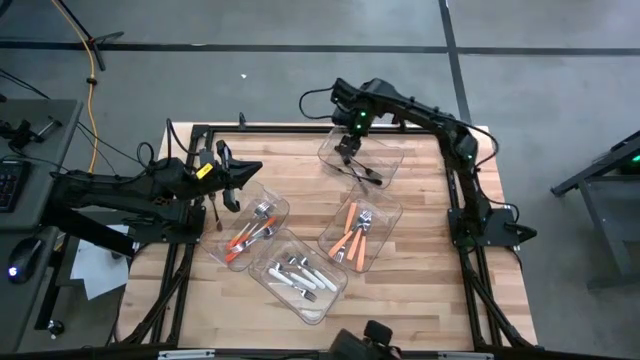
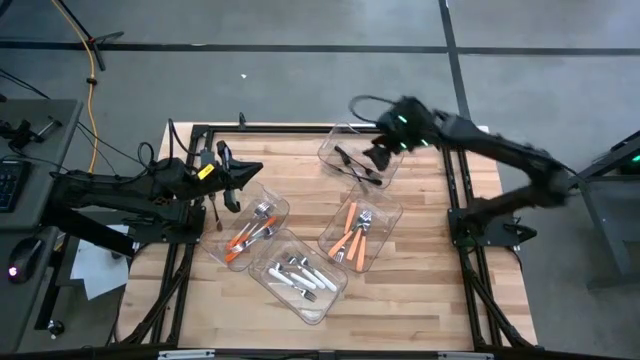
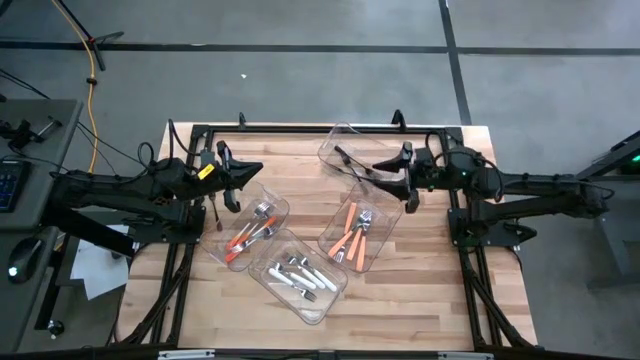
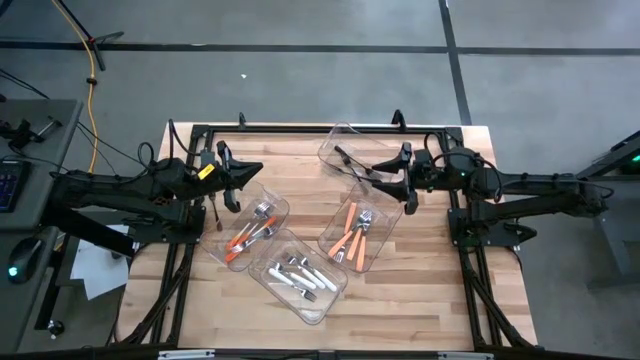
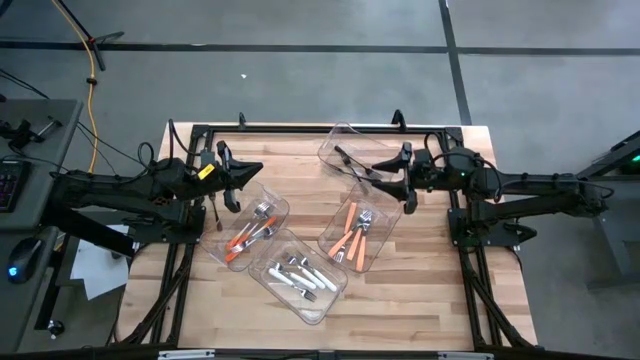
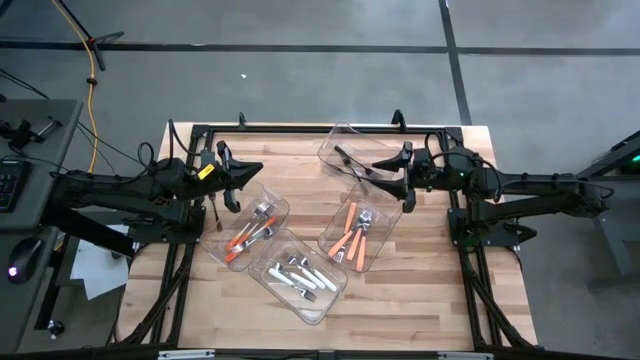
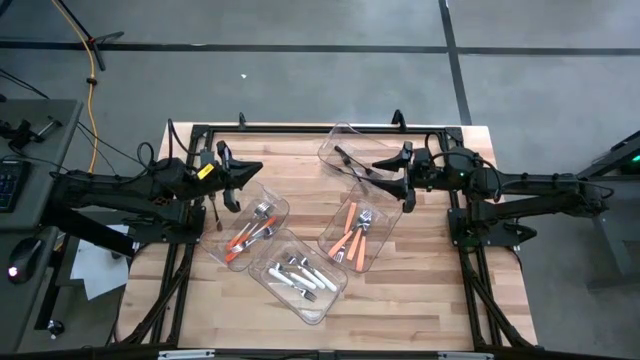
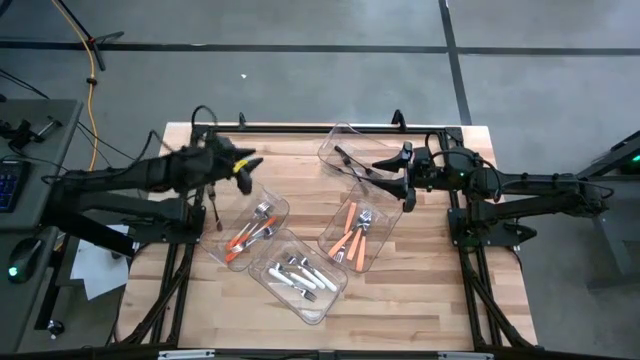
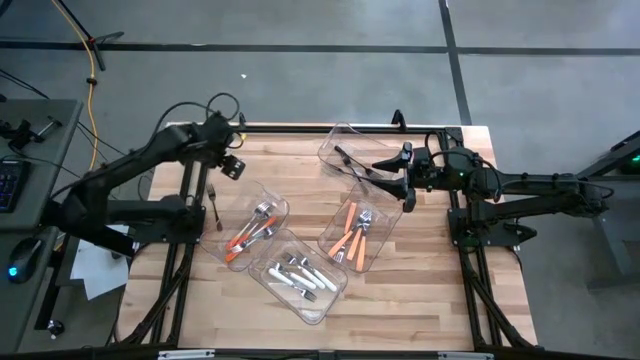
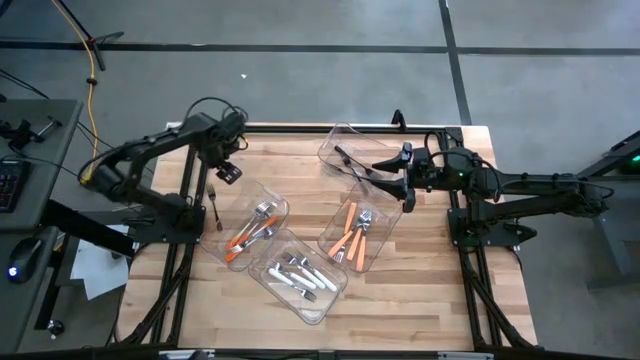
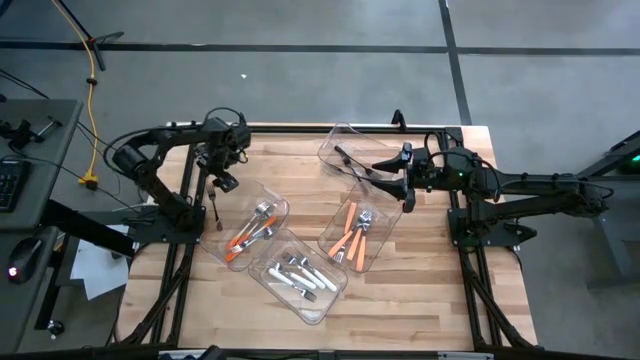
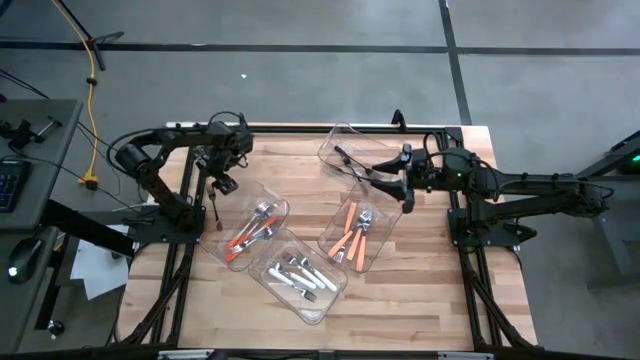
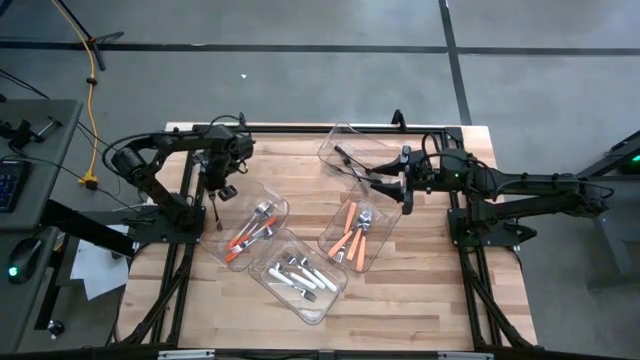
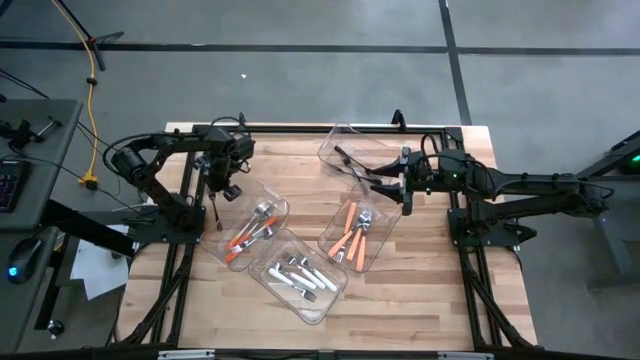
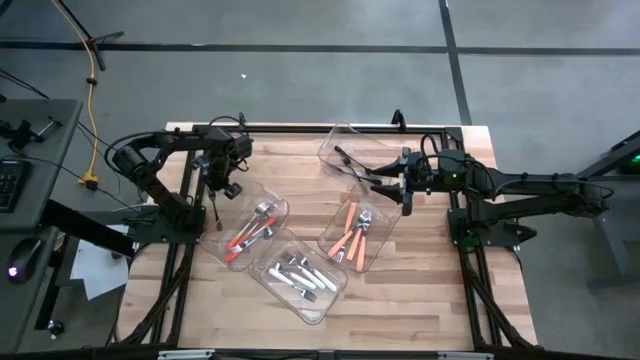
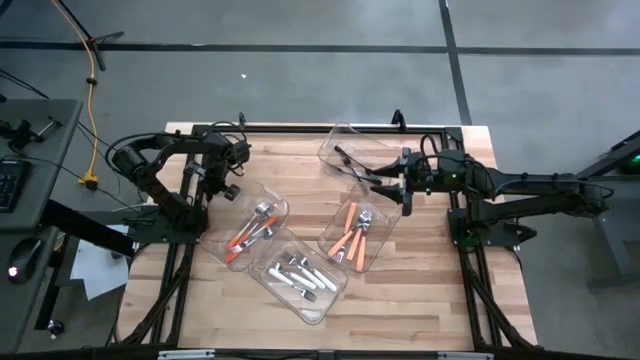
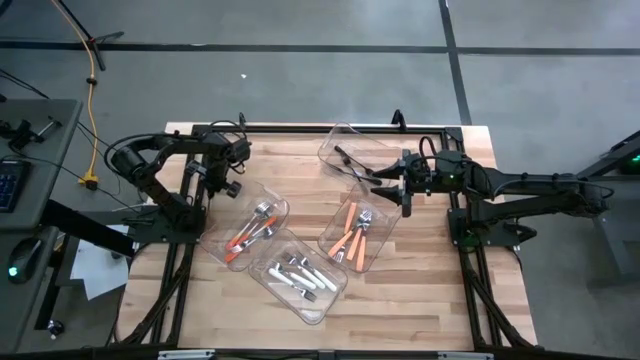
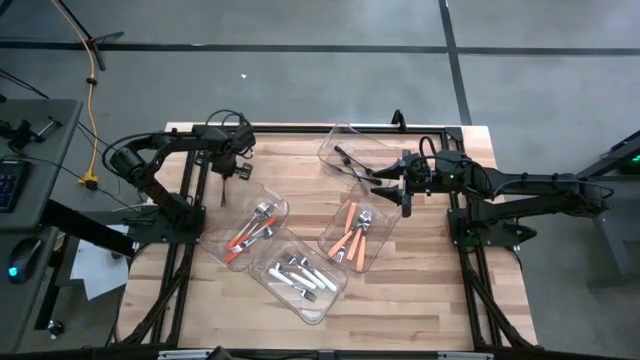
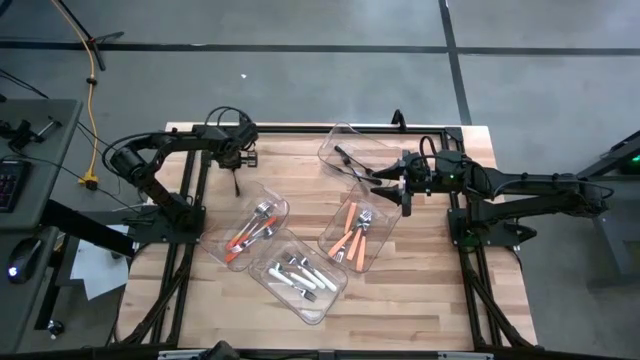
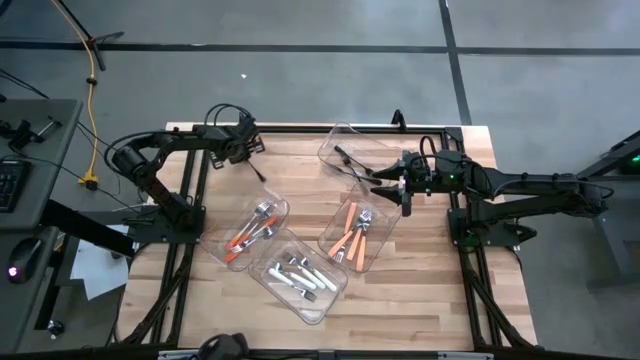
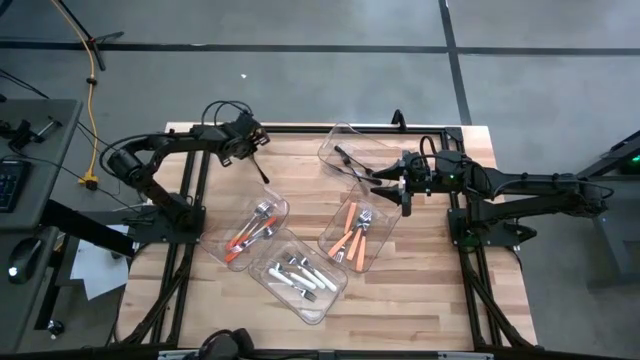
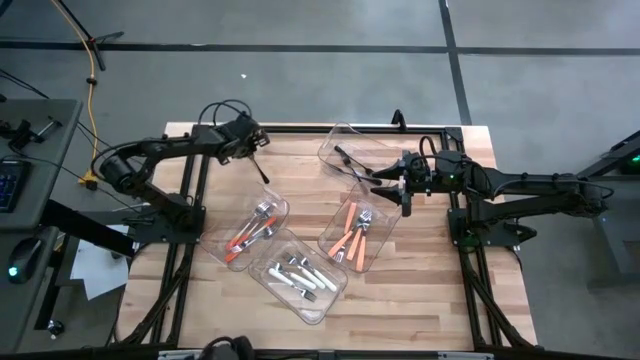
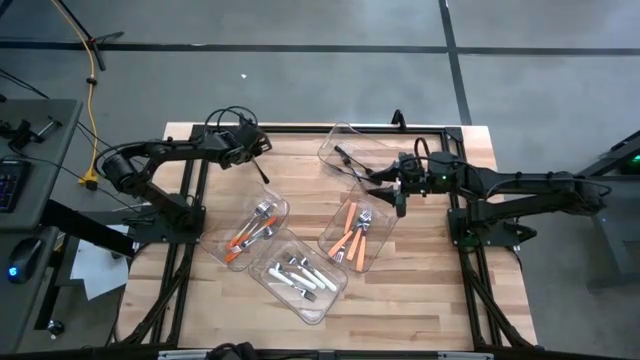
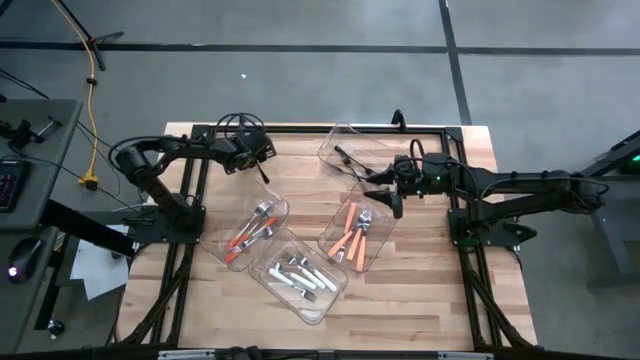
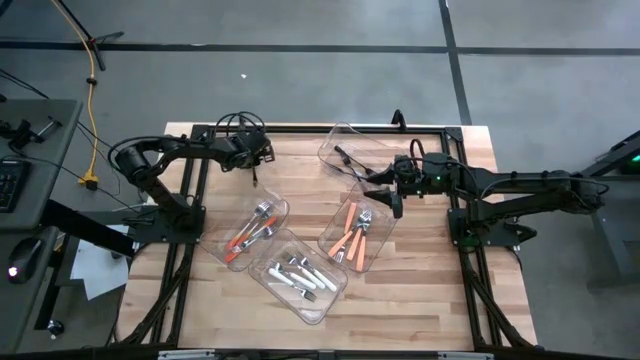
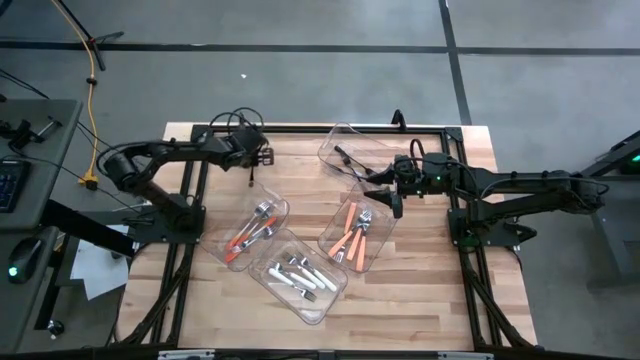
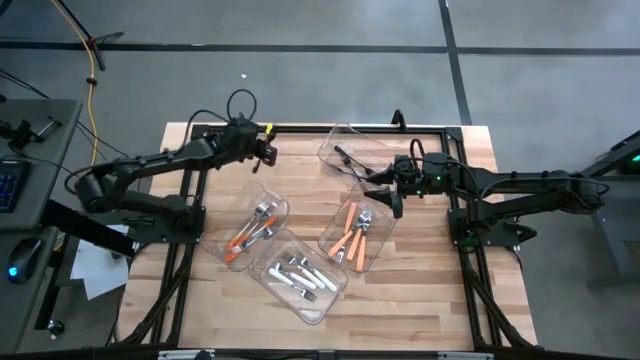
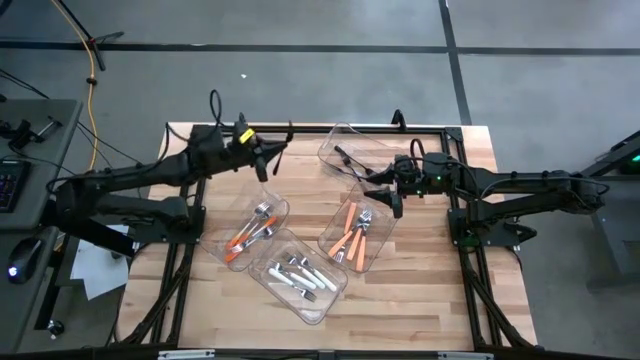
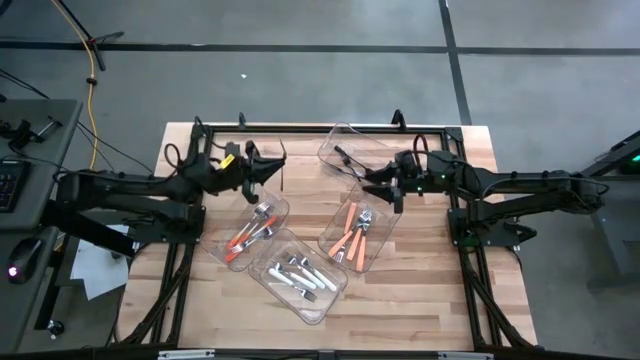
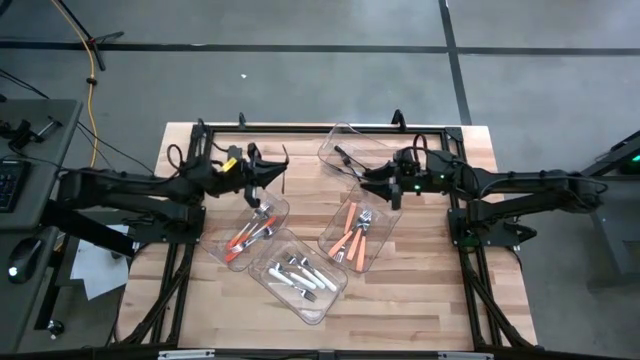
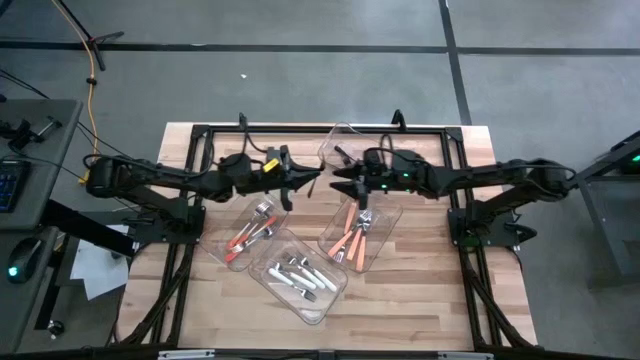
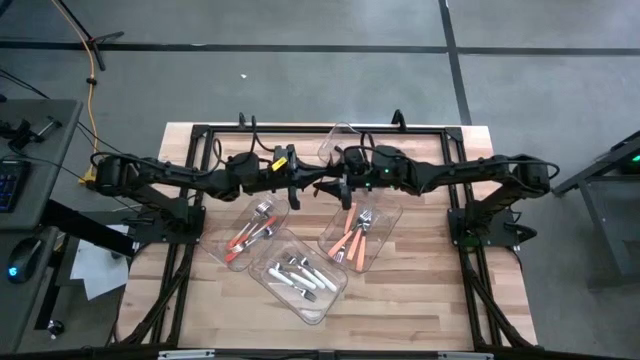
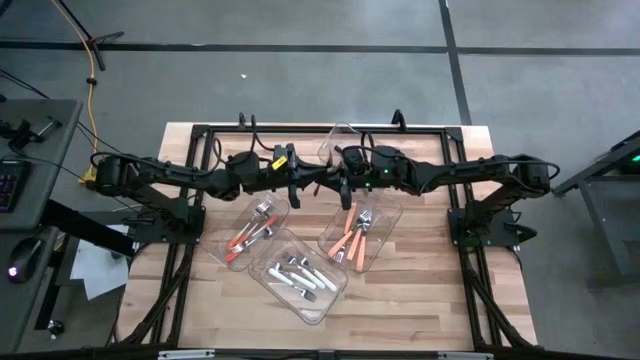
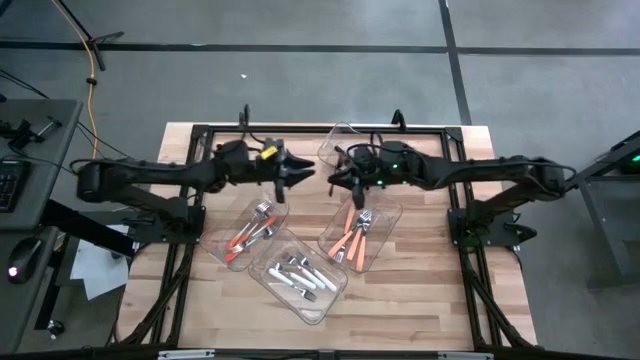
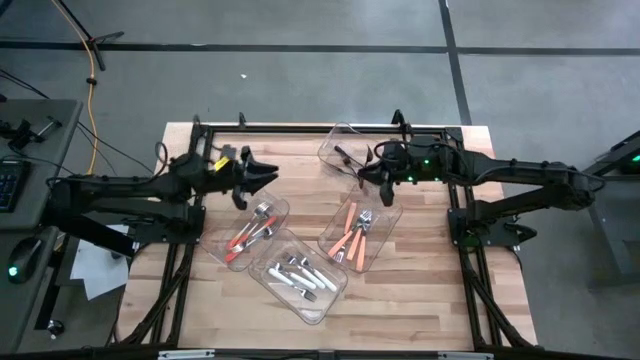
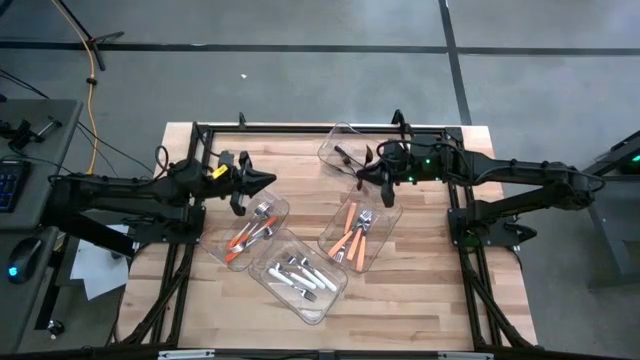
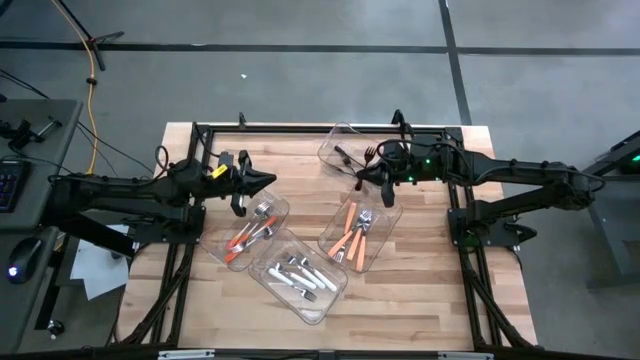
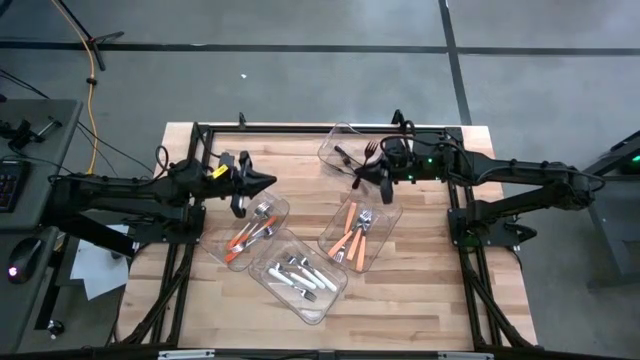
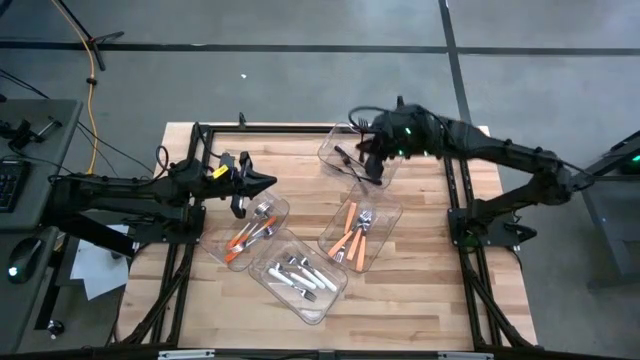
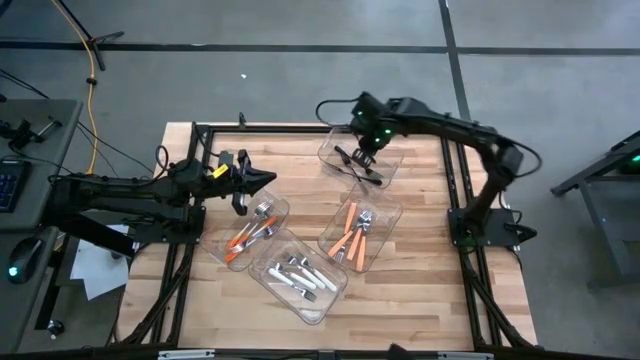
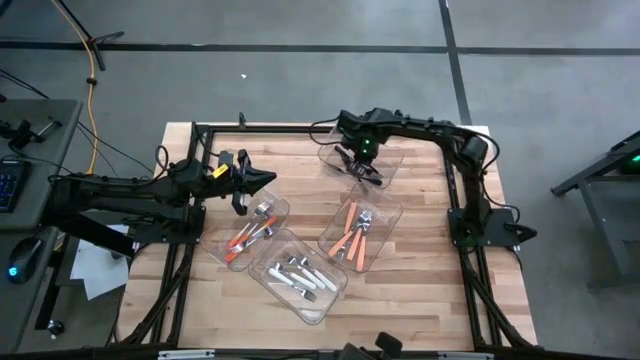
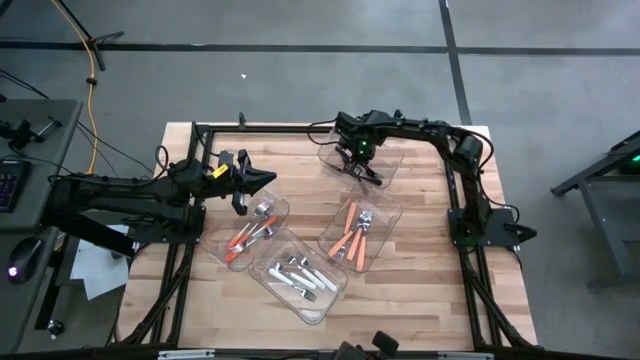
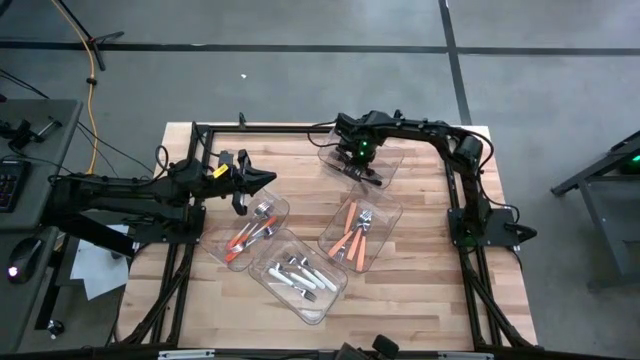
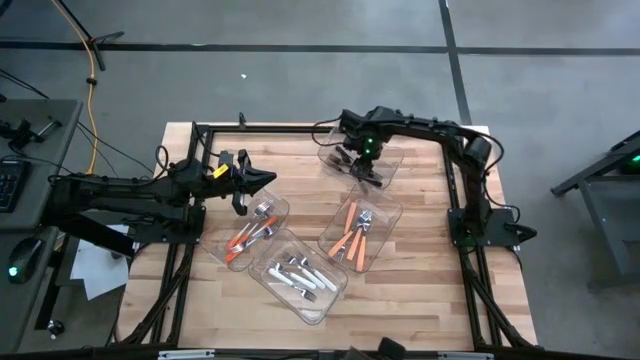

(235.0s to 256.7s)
Task: Sort silverware by color (type)
Put the black fork into the top transparent bin
